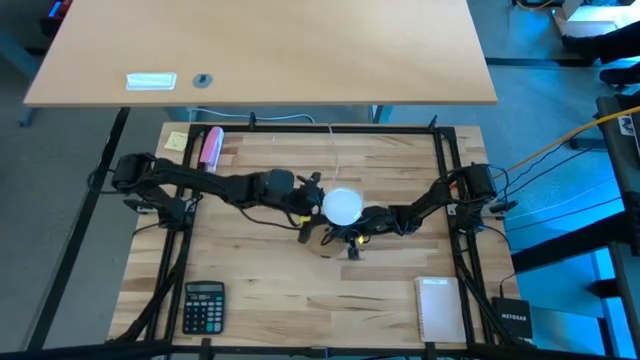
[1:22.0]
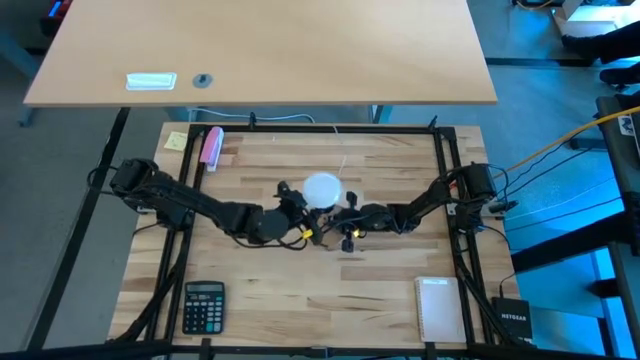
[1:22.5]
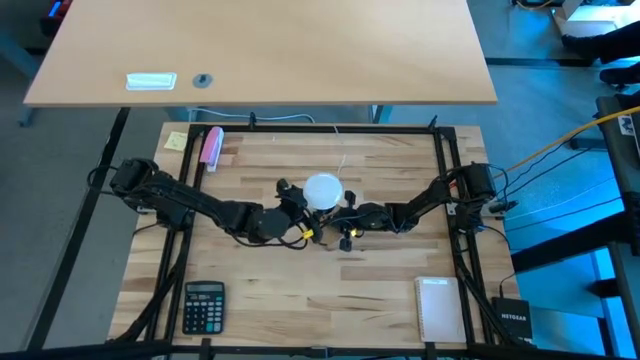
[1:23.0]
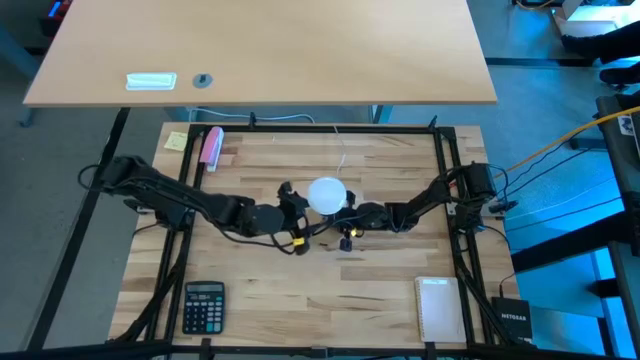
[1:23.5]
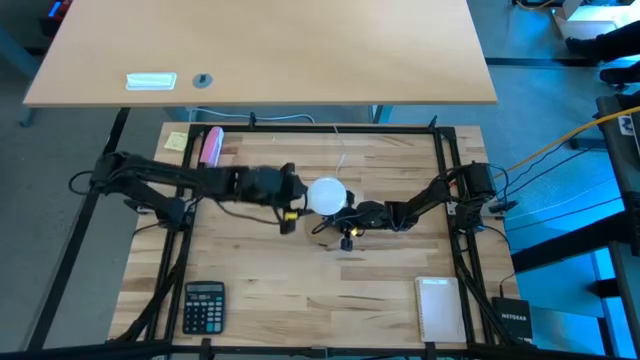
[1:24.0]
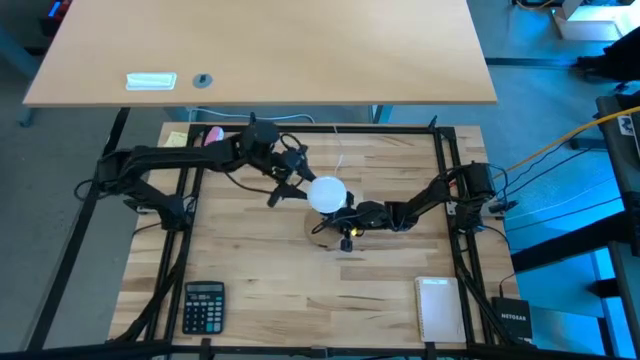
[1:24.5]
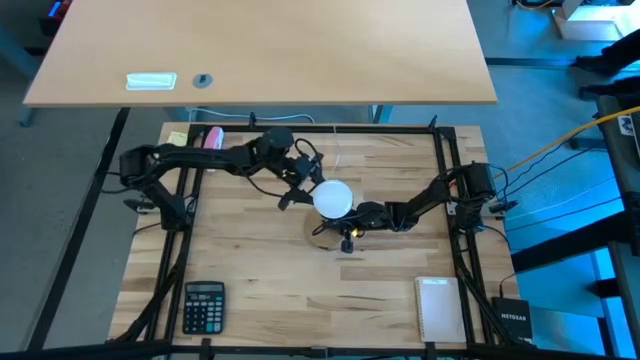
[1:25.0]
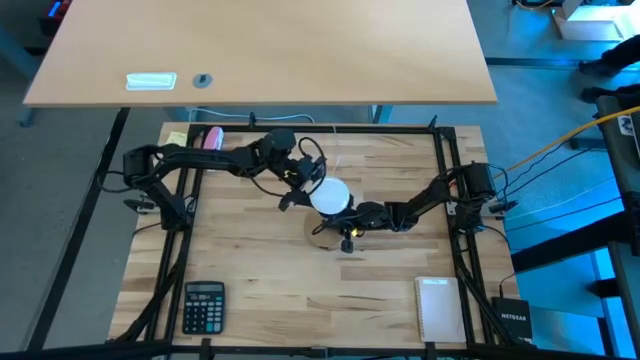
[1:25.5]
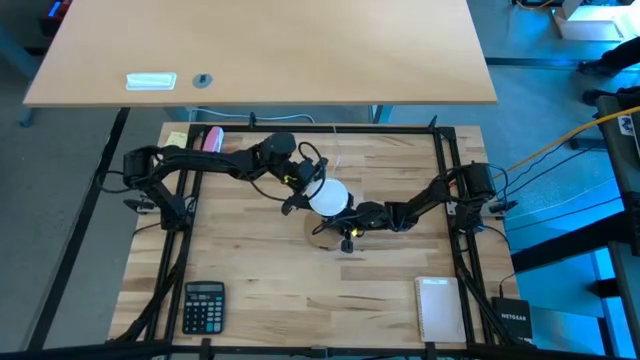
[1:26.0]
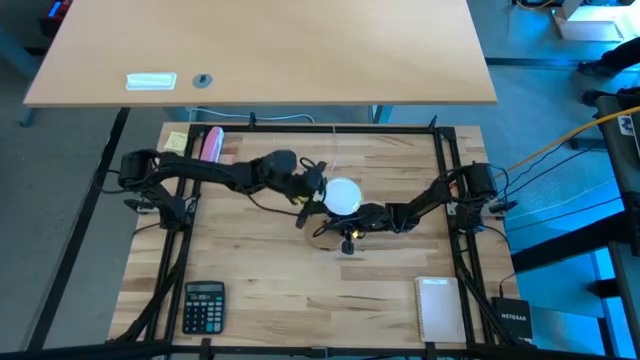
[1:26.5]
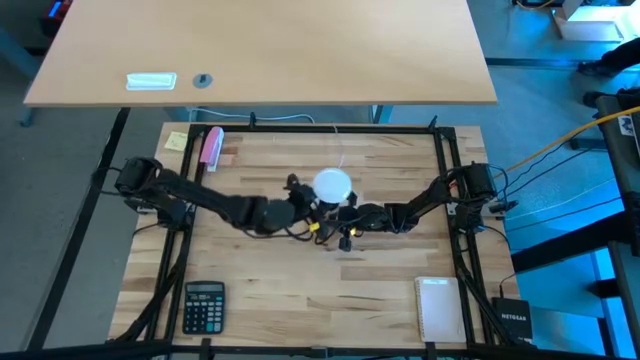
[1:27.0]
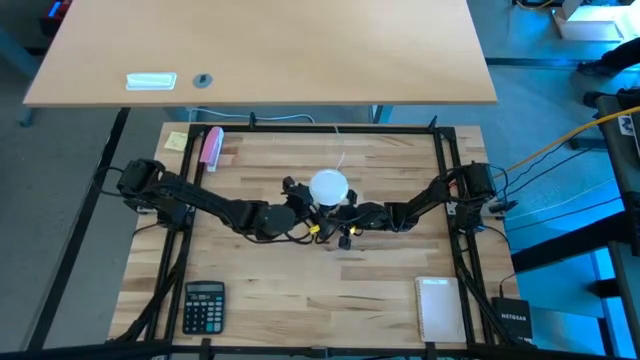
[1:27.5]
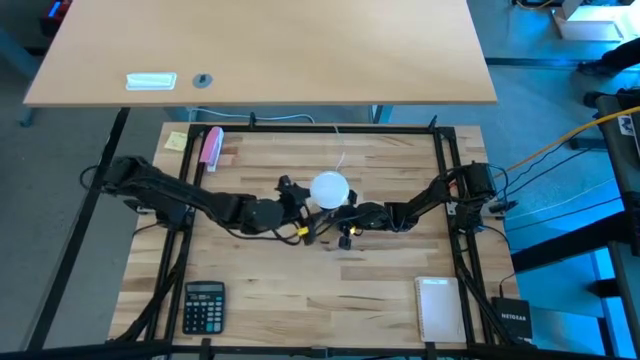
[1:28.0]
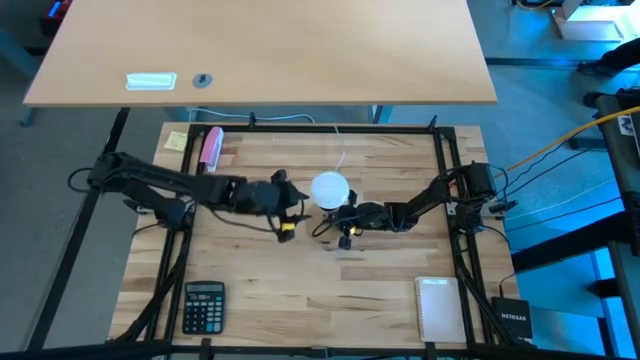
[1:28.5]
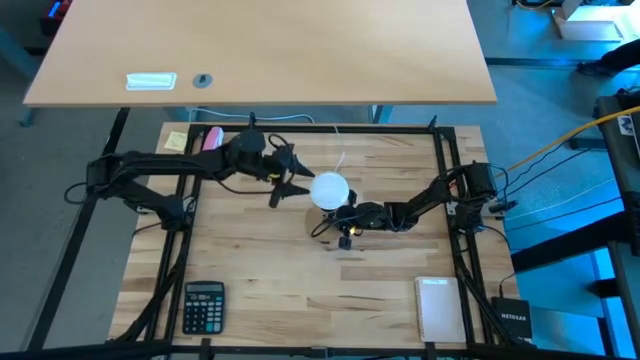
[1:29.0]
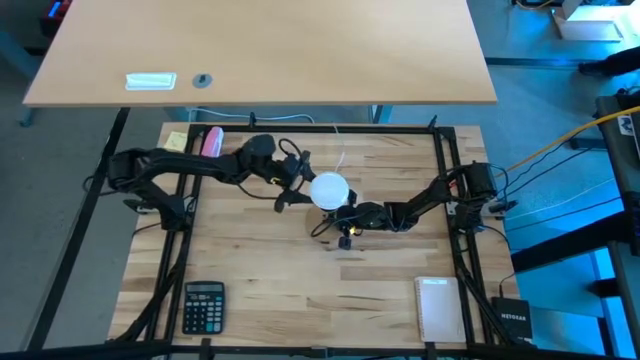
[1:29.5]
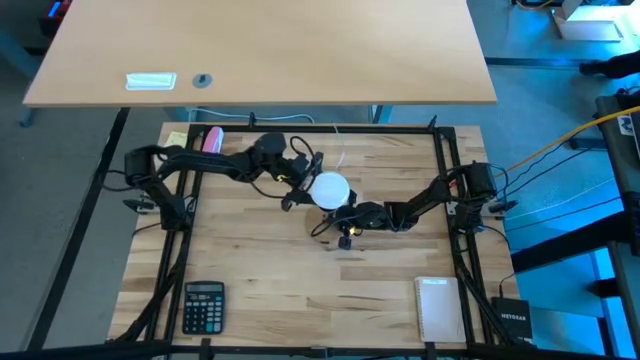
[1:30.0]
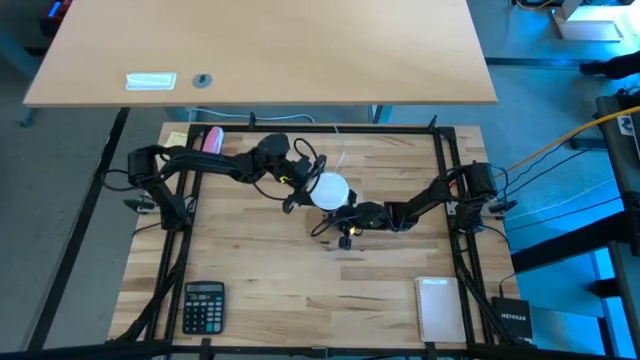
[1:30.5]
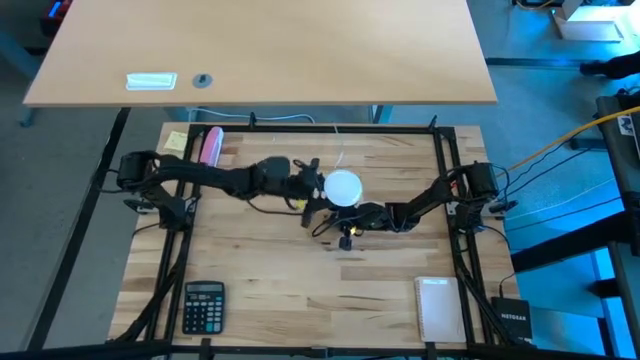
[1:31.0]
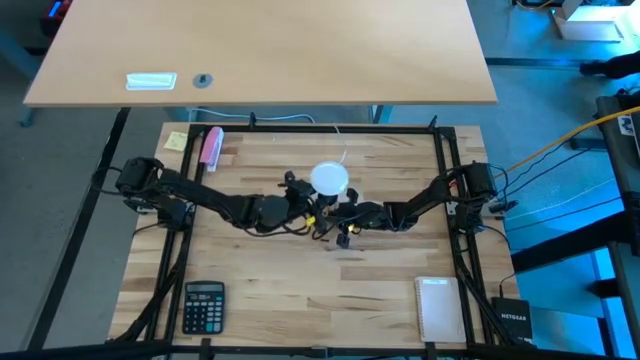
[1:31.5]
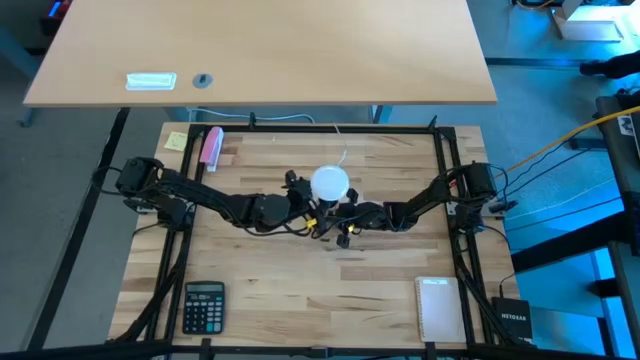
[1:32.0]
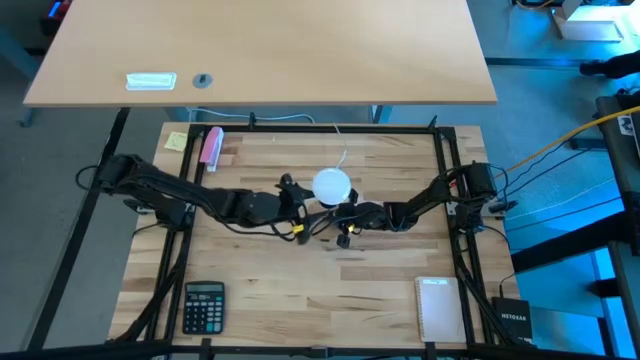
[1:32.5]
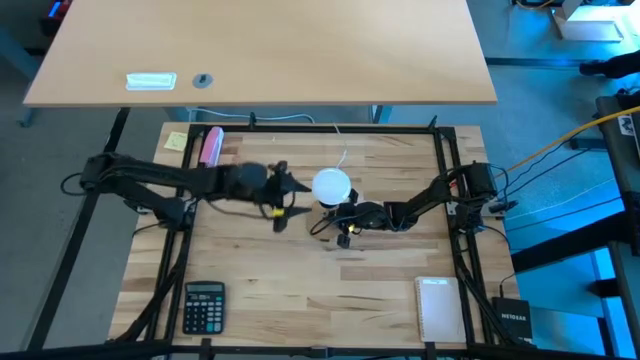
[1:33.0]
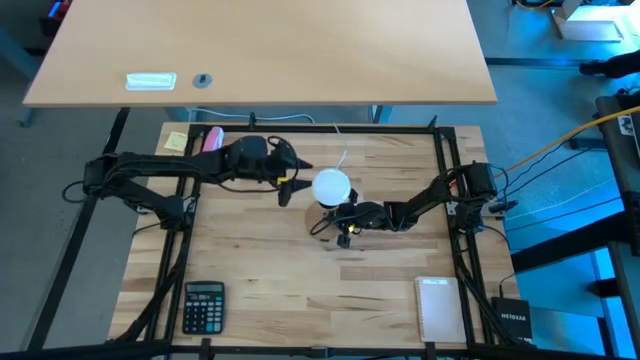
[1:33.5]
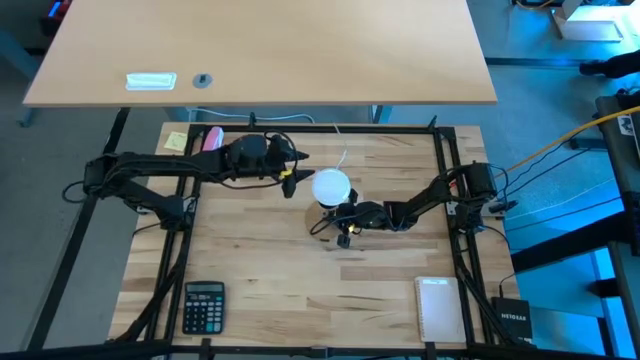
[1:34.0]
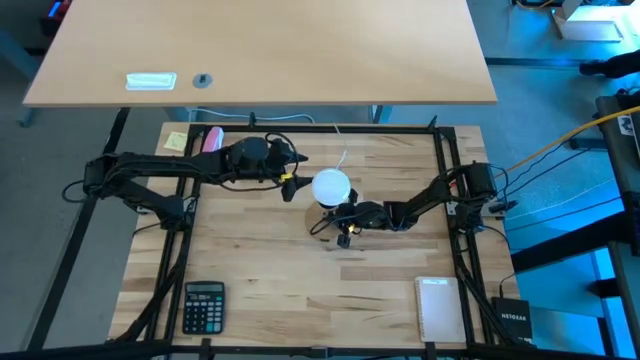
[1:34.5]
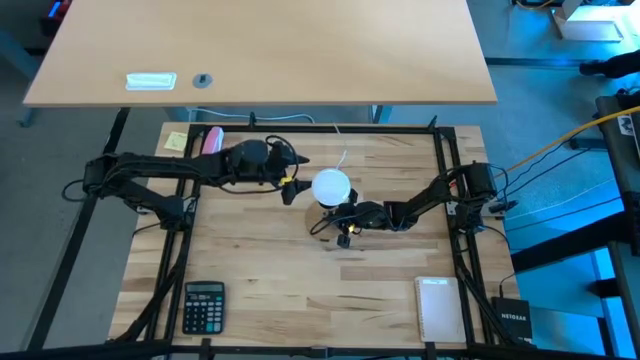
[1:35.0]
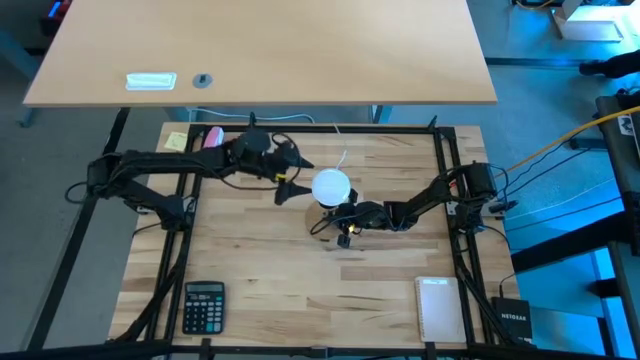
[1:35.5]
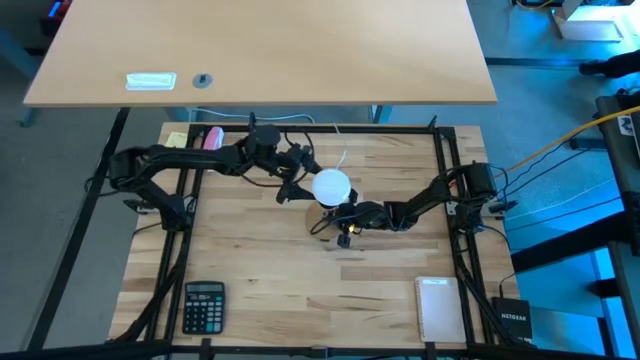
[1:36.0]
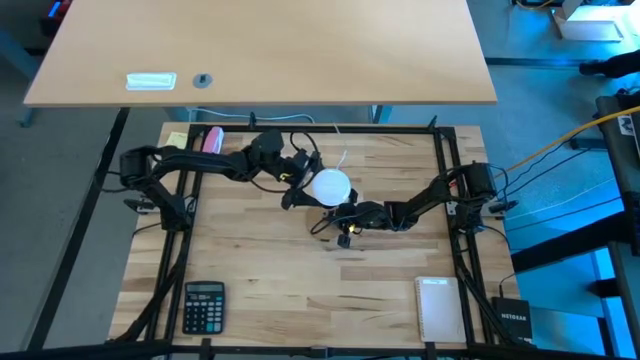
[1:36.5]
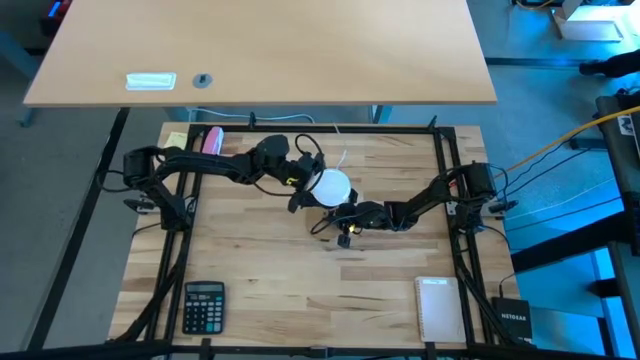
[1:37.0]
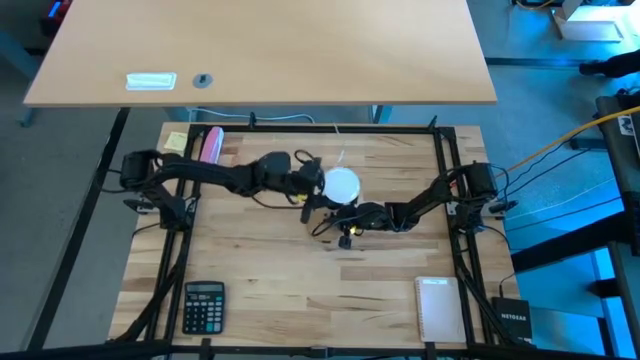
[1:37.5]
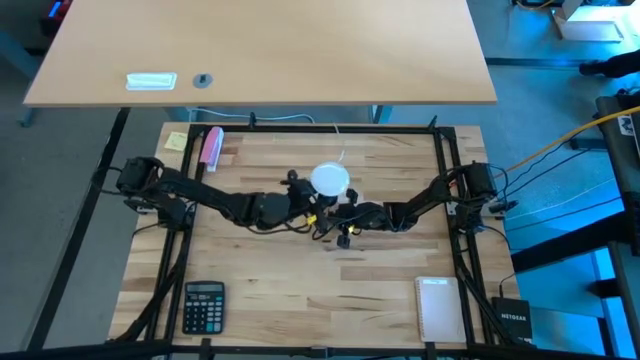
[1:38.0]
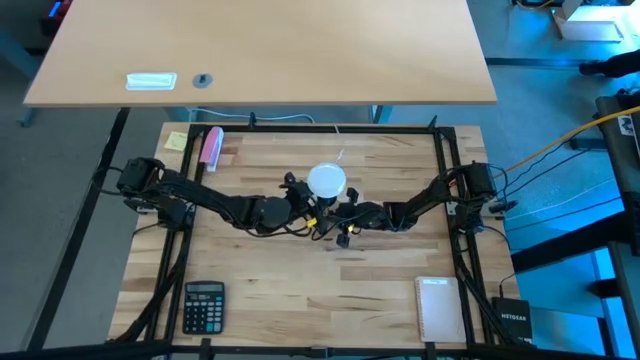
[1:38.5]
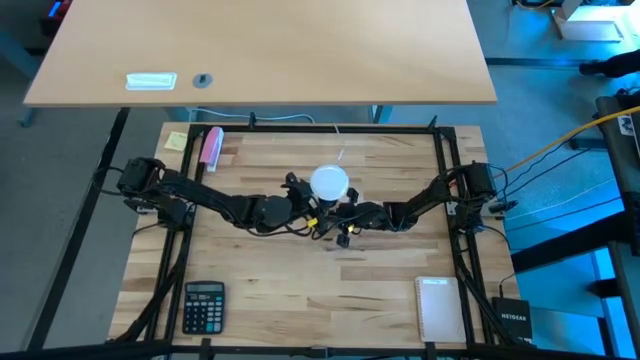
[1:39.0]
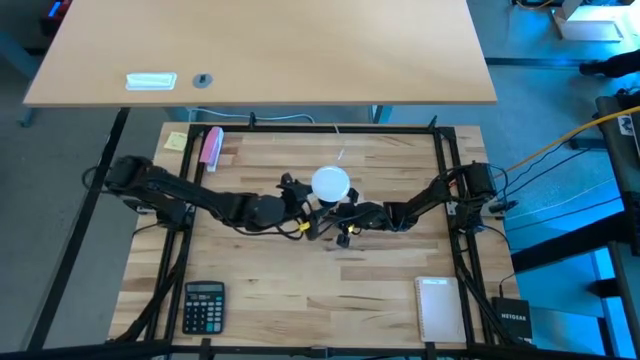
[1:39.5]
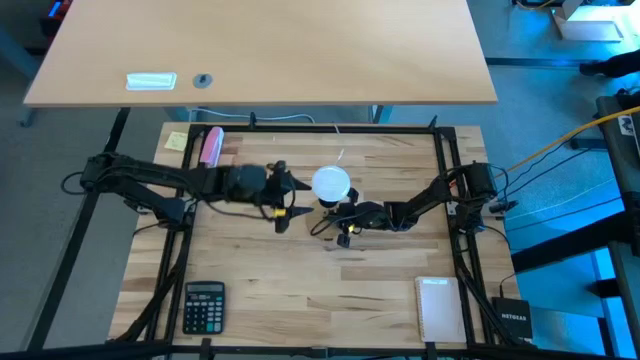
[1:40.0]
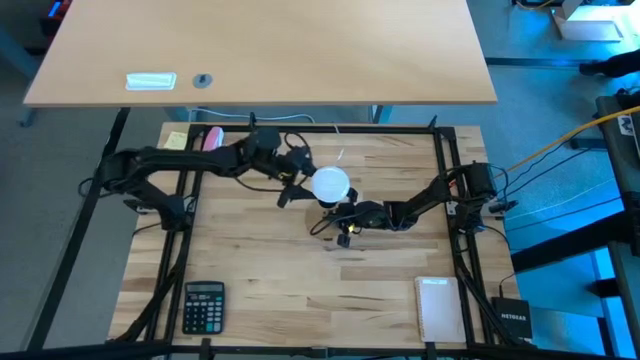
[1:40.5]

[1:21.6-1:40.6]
Task: Screw lightbulb
Remove the white lightbulb from the lamp

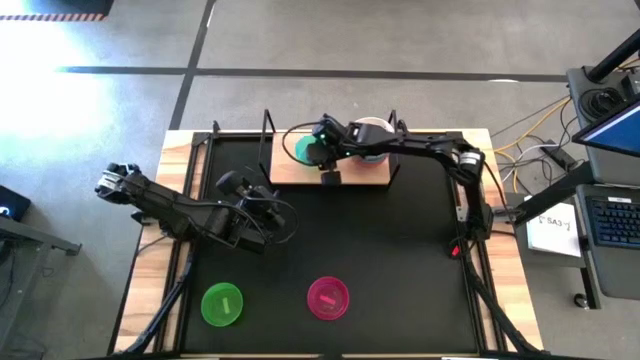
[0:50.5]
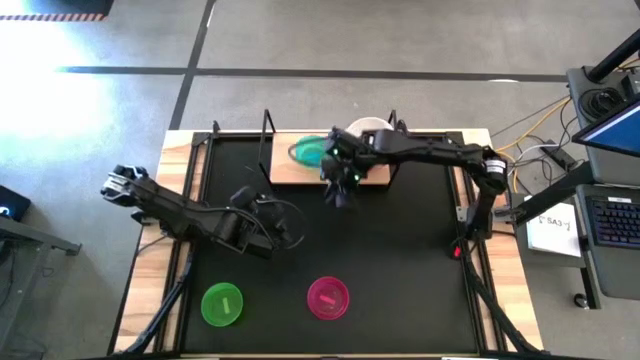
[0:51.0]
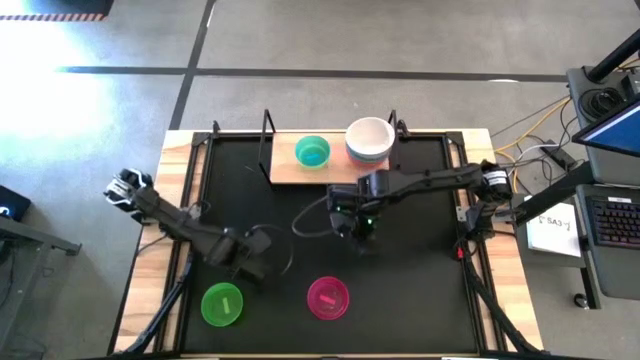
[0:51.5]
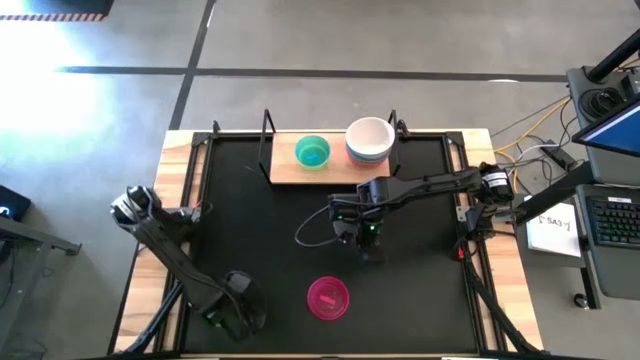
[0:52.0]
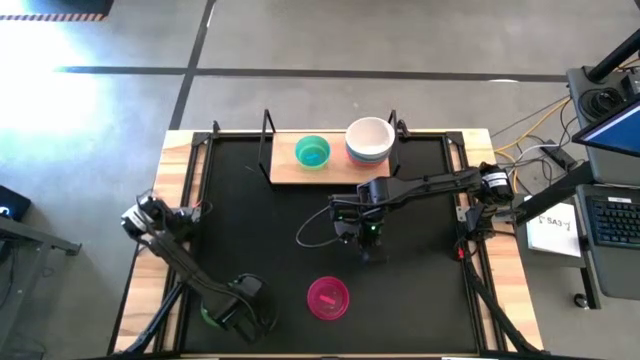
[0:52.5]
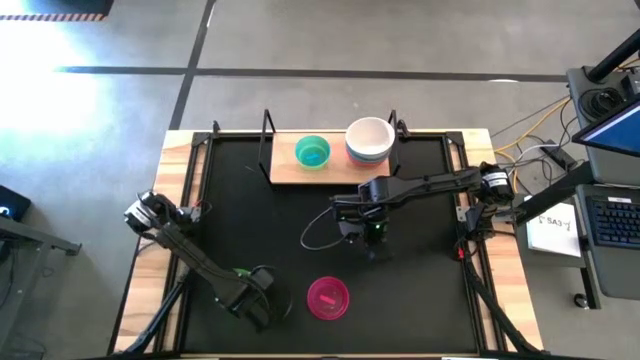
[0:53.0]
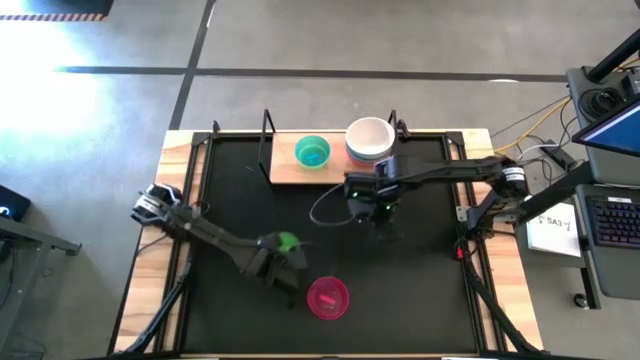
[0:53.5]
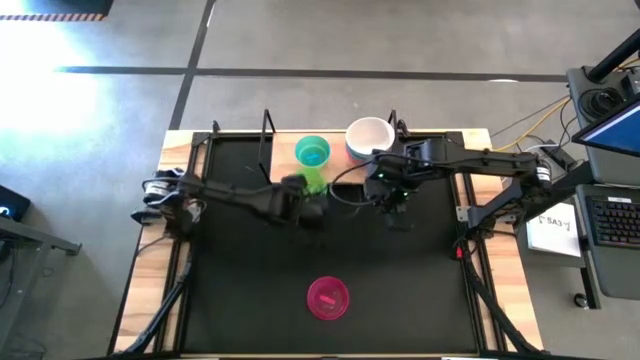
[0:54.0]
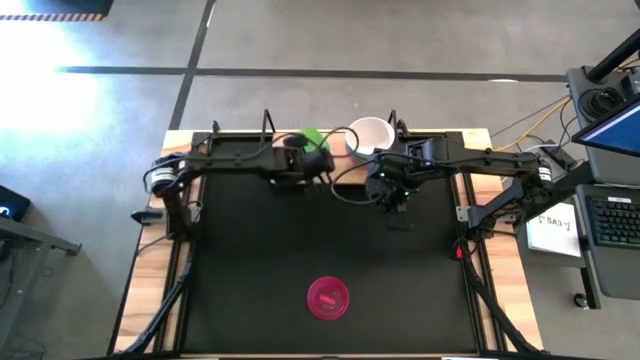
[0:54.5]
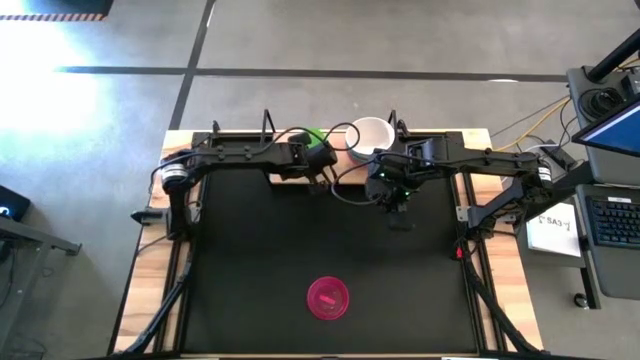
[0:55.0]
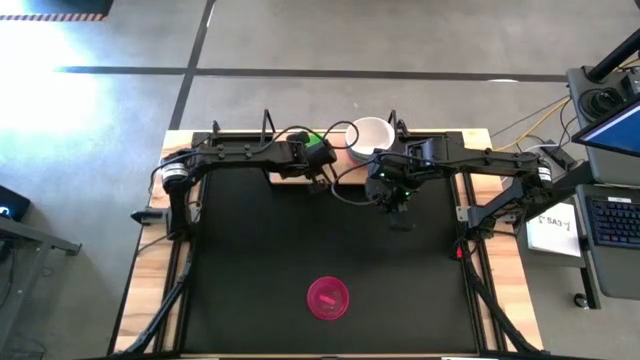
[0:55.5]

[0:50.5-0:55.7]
Task: Place and stack bowls onto a shelf
Stack the transparent green bowl on top of the transparent blue bowl
